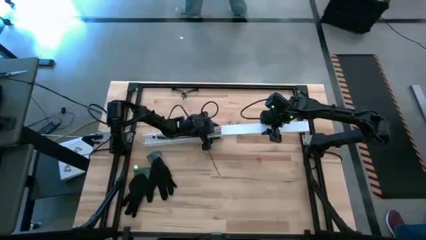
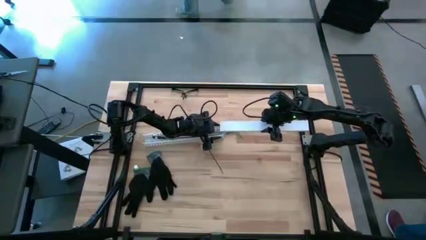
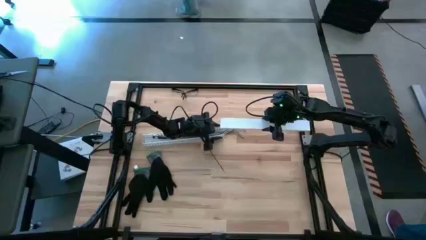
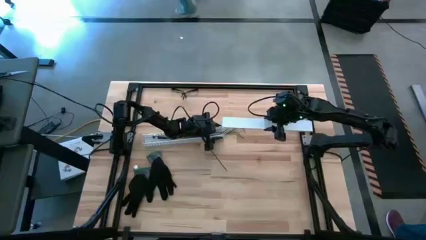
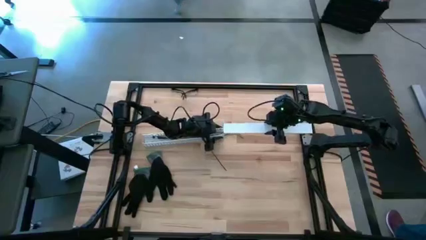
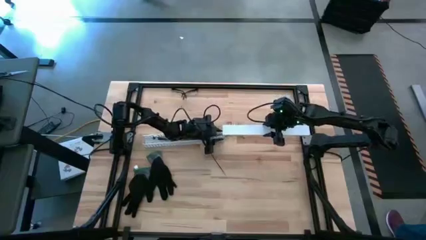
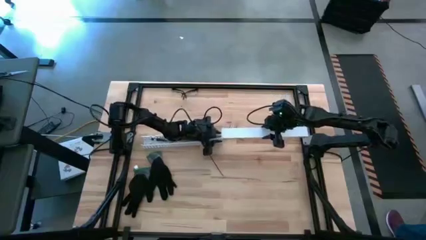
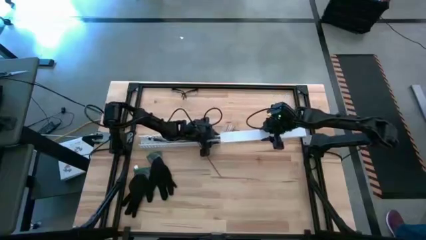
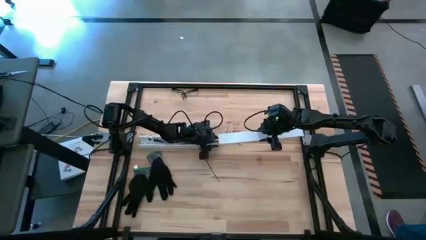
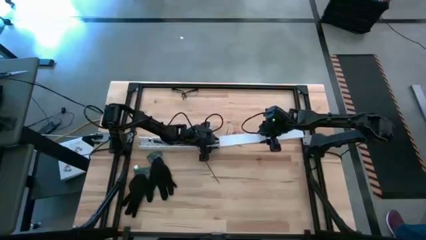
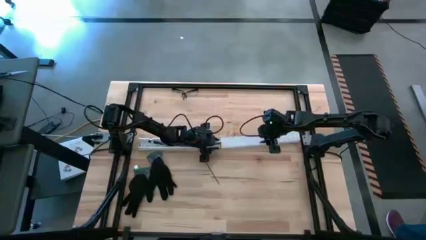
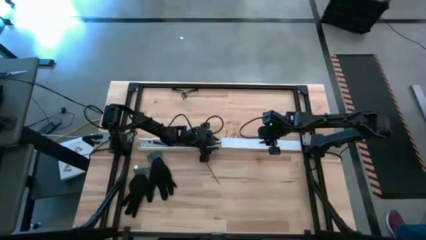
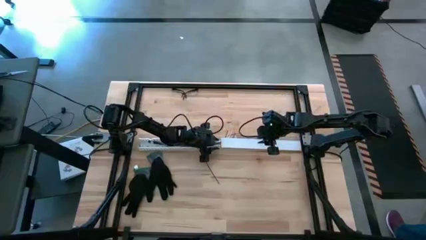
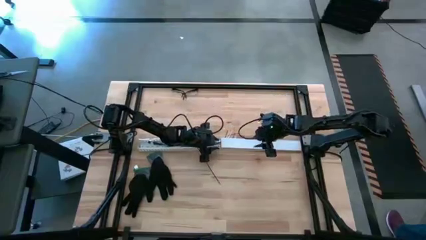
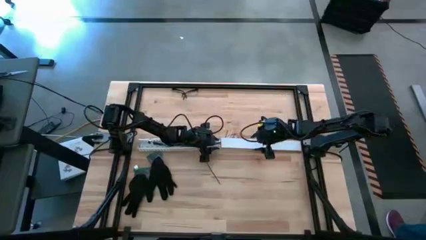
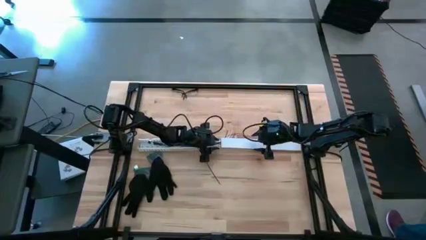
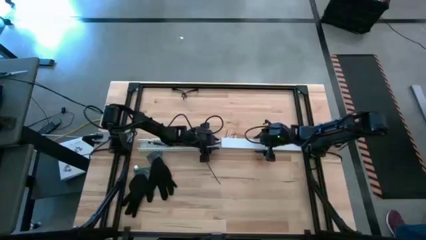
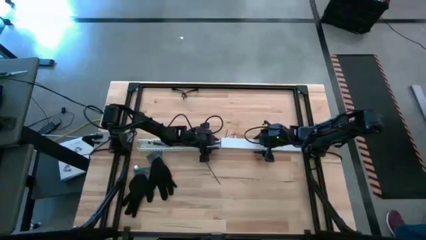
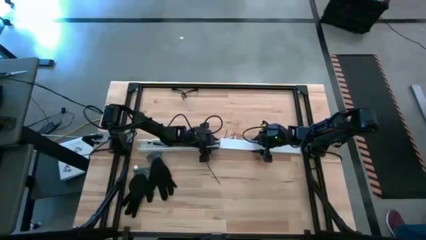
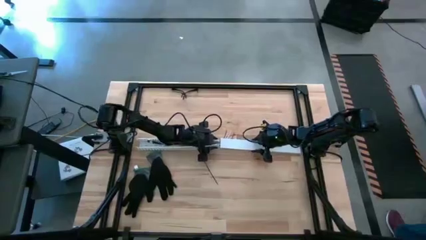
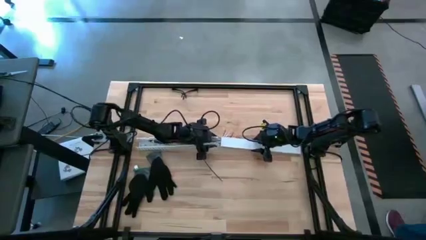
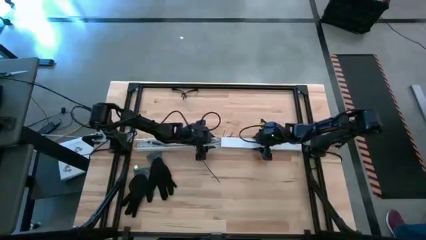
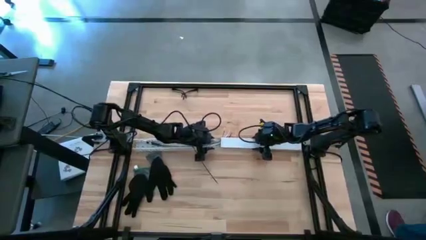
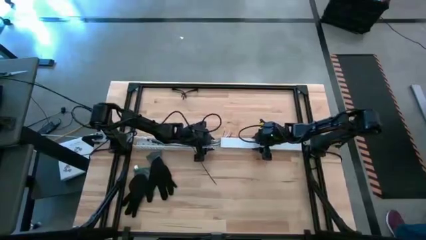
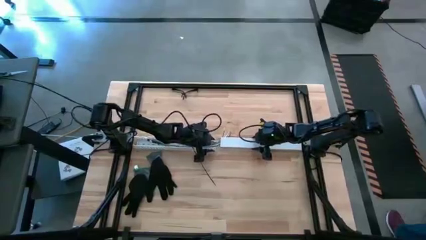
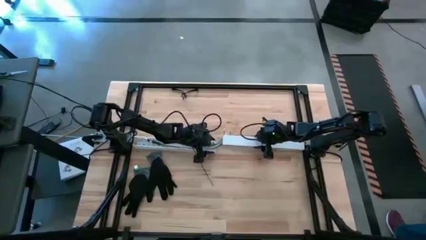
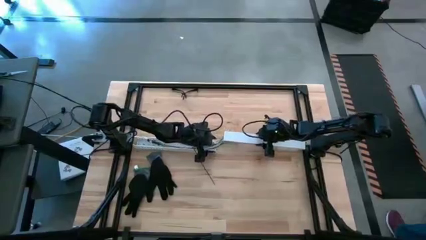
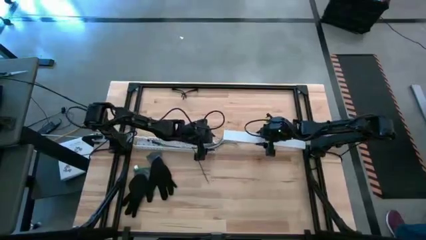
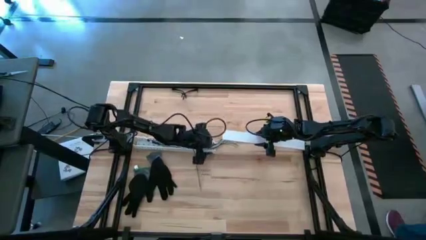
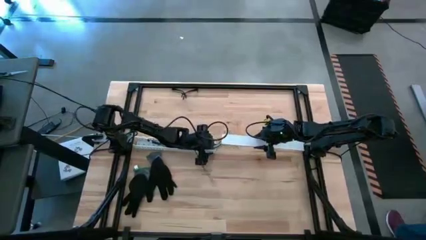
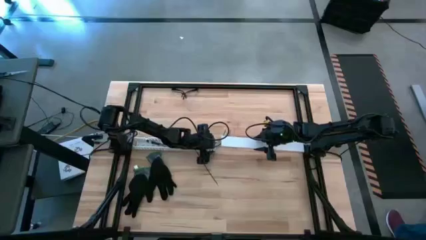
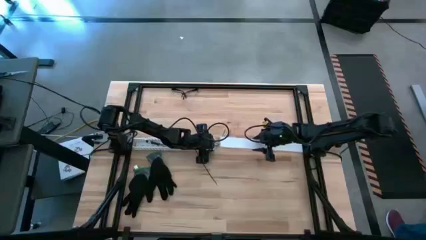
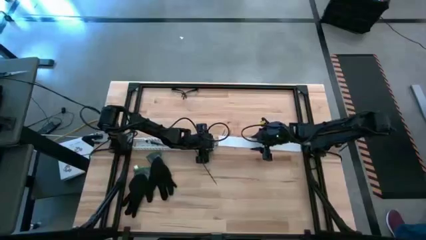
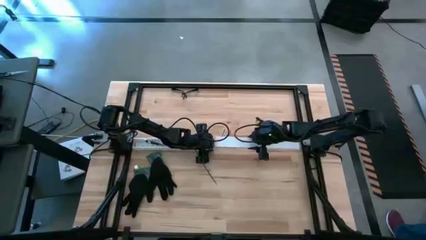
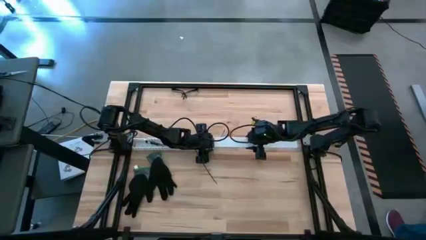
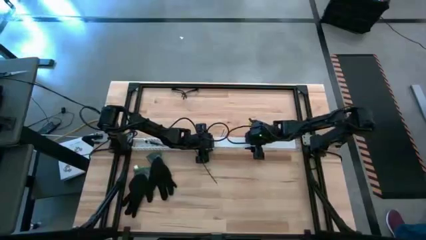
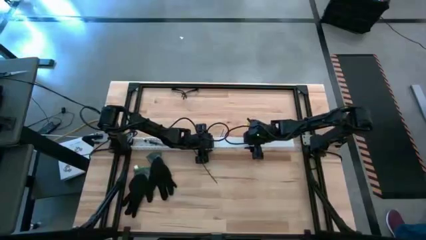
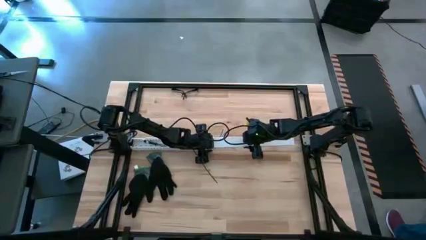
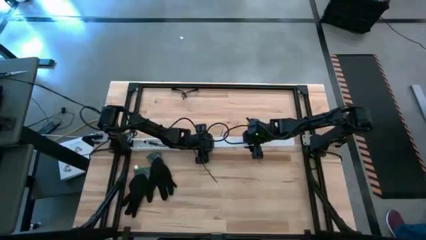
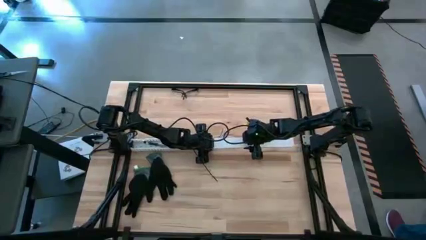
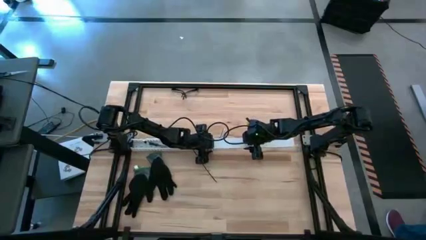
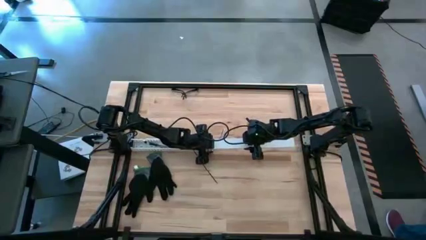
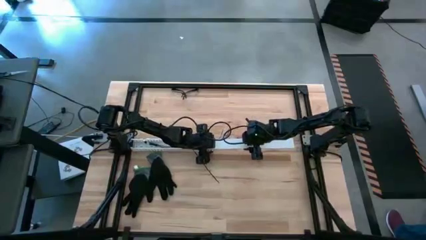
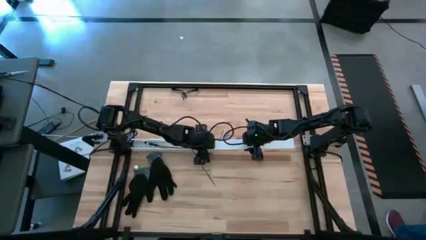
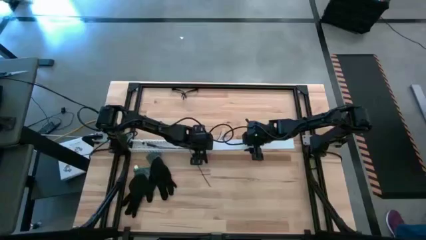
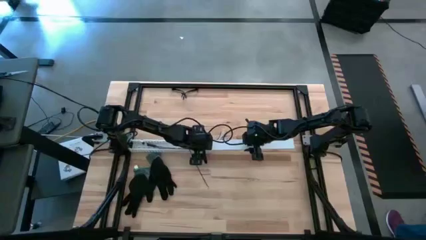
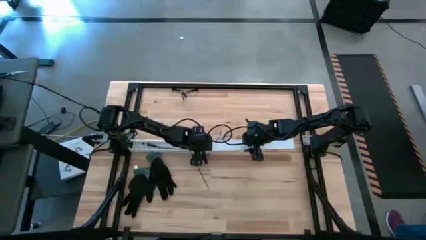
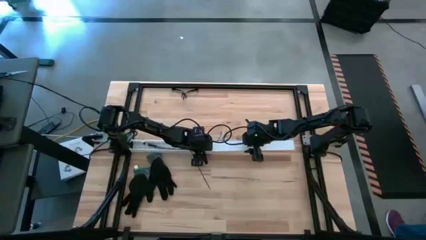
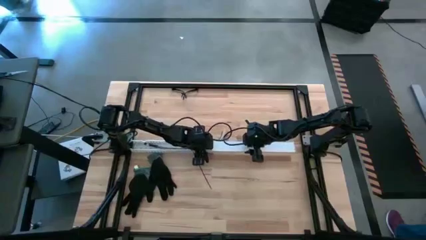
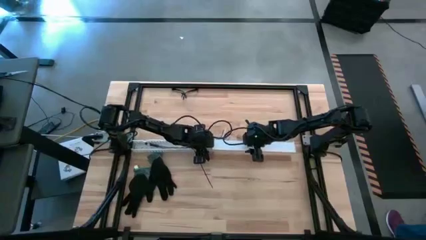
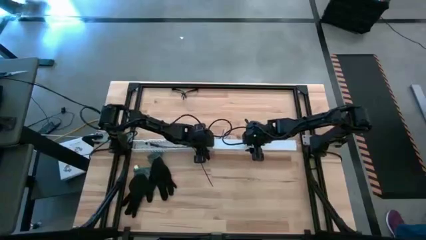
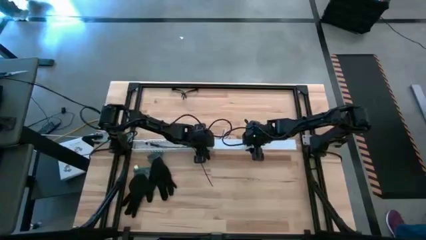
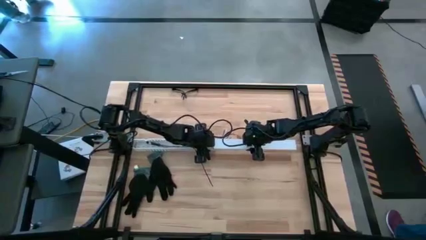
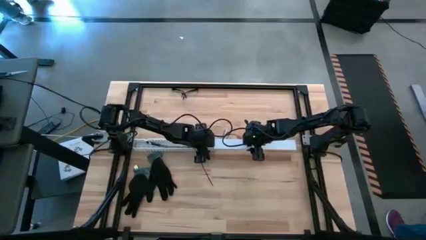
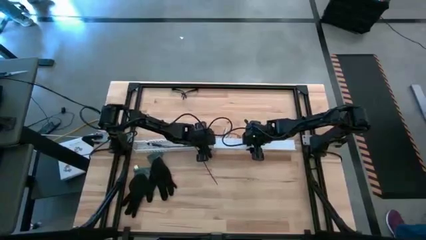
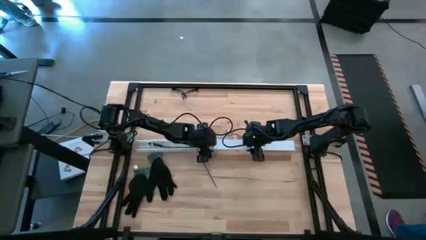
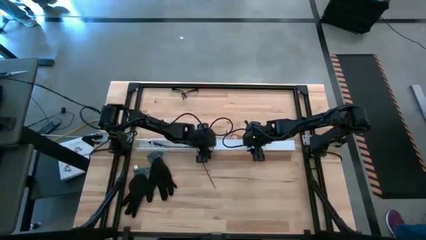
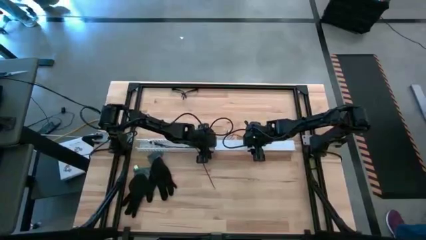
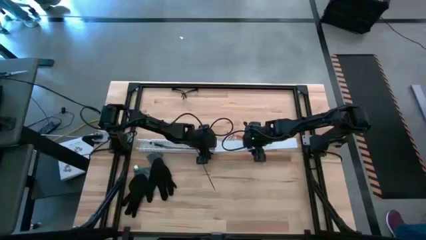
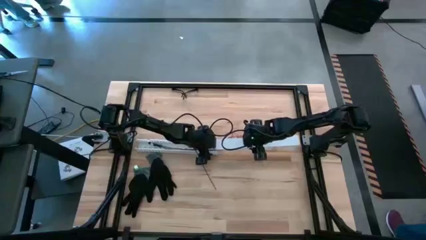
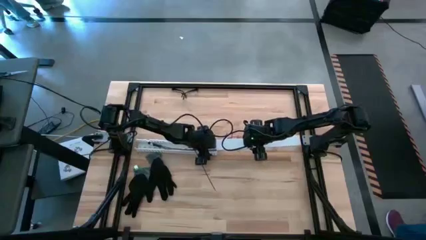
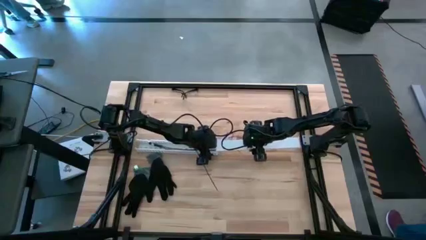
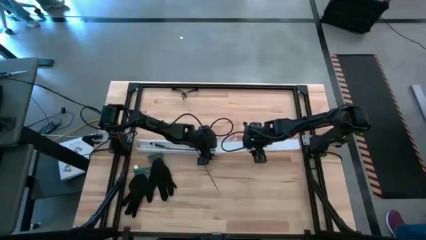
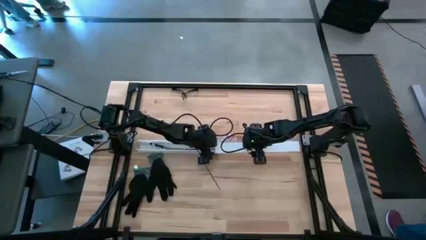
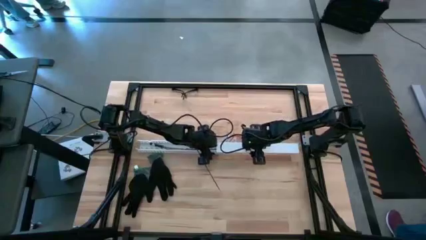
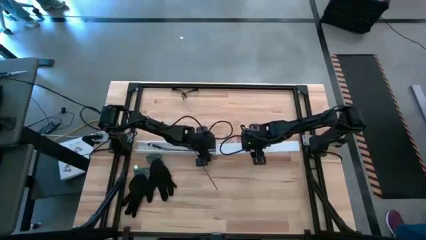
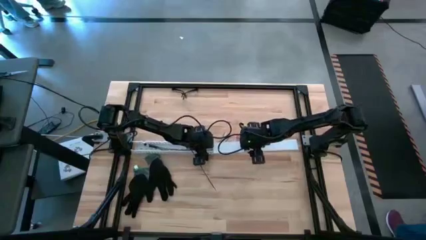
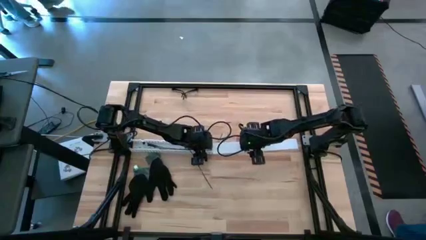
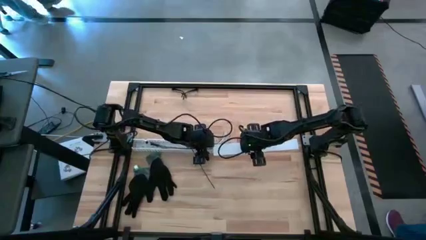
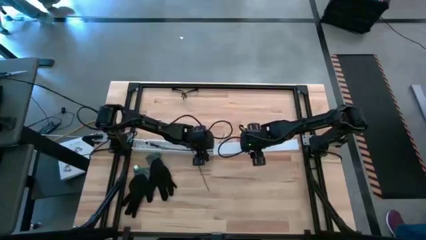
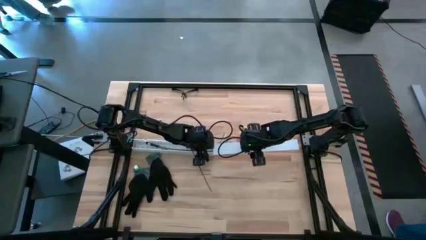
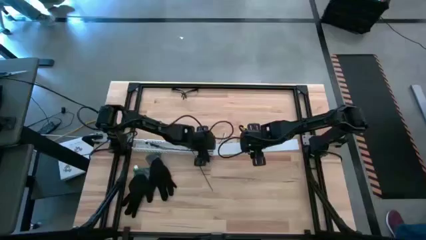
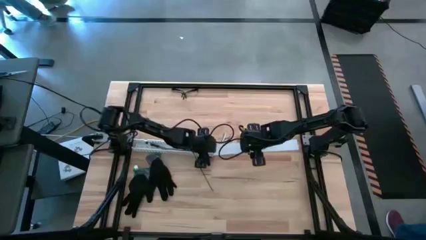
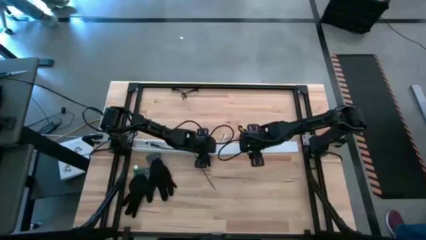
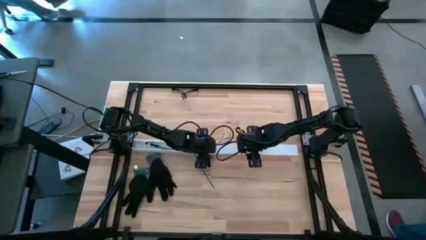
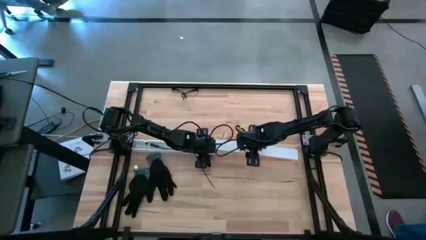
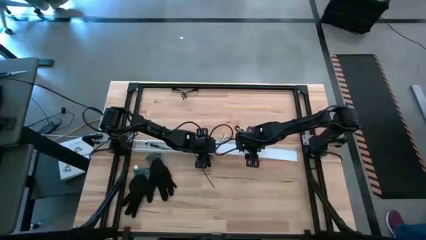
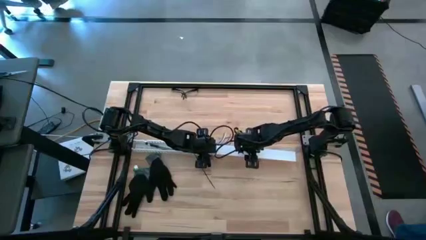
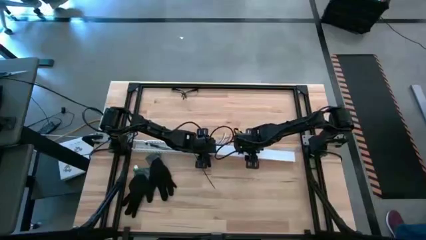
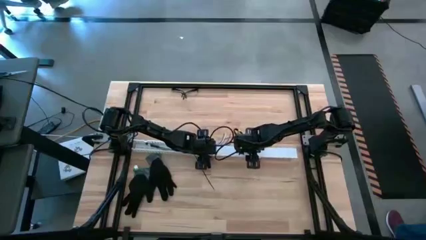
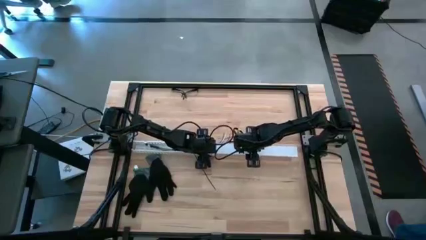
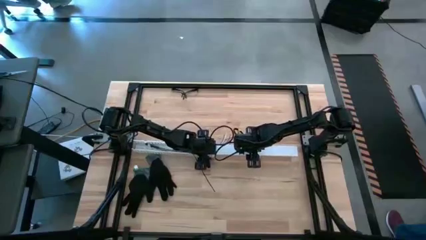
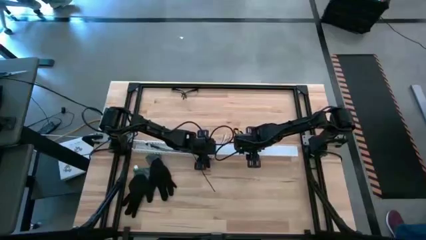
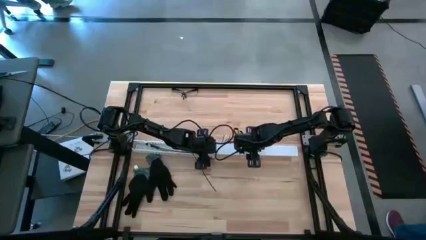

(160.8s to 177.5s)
Task: Ziptie cables
Close the white cable duct
